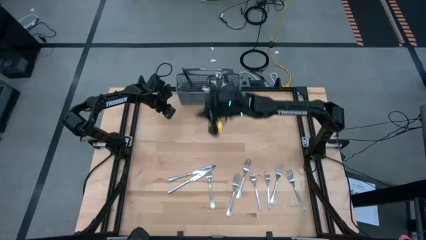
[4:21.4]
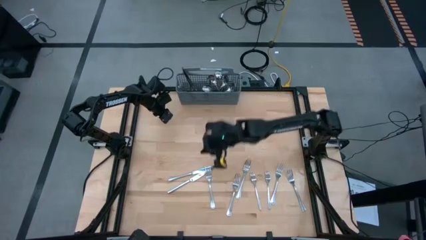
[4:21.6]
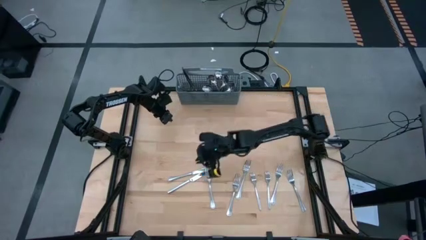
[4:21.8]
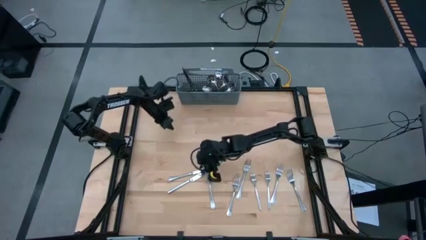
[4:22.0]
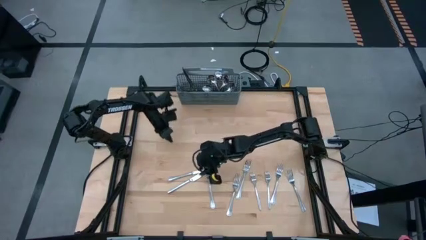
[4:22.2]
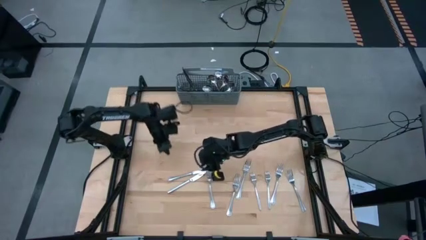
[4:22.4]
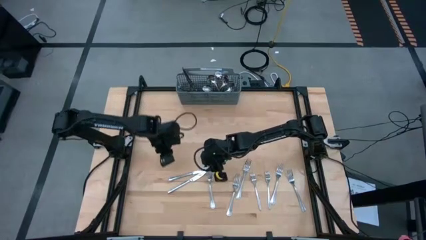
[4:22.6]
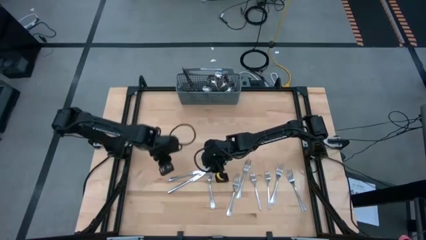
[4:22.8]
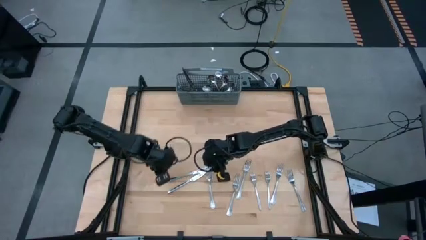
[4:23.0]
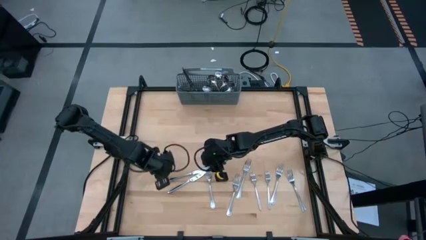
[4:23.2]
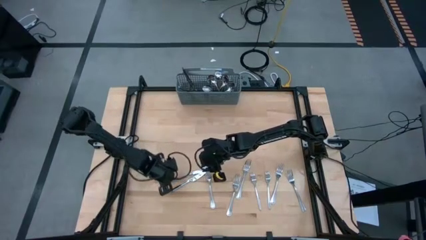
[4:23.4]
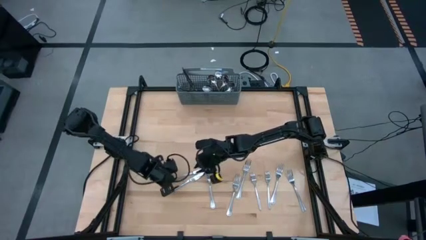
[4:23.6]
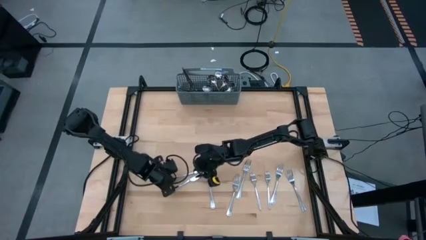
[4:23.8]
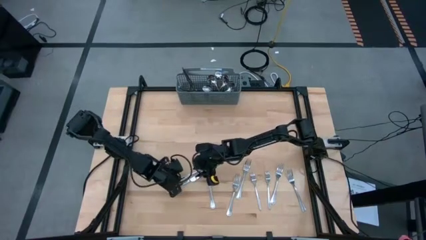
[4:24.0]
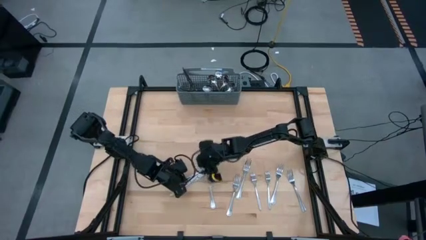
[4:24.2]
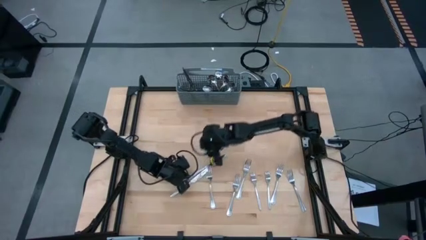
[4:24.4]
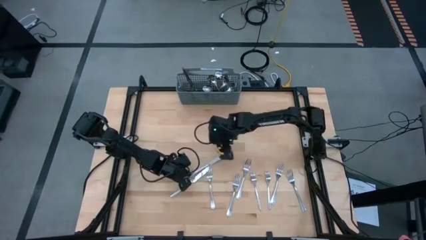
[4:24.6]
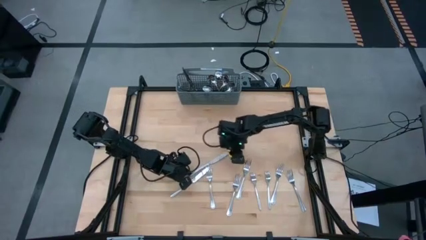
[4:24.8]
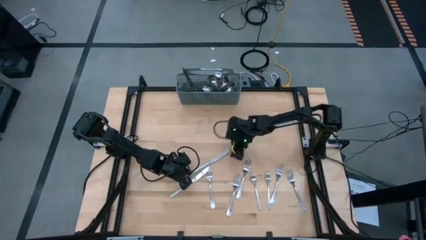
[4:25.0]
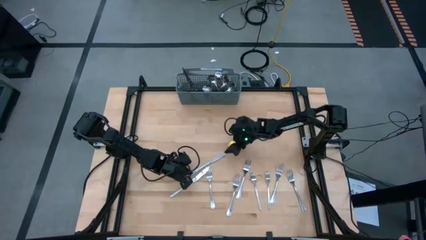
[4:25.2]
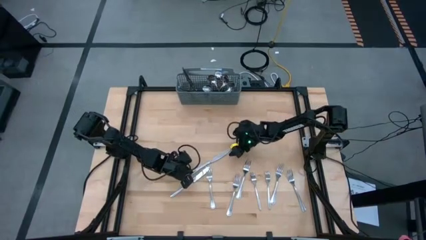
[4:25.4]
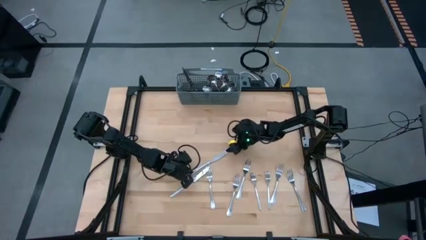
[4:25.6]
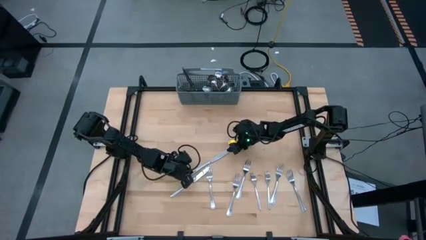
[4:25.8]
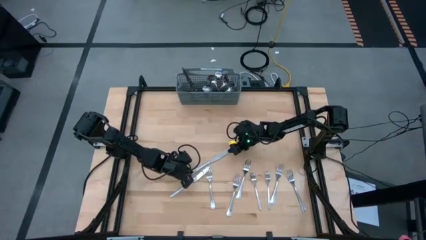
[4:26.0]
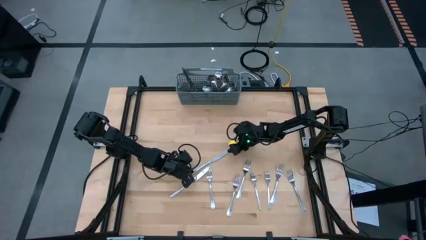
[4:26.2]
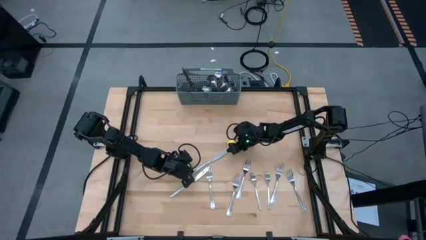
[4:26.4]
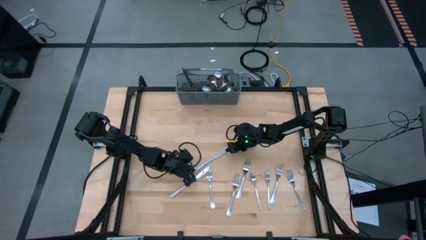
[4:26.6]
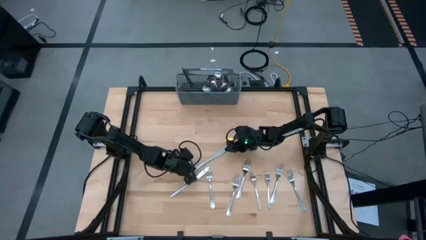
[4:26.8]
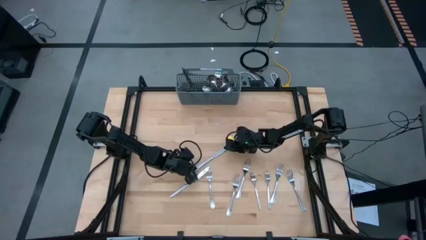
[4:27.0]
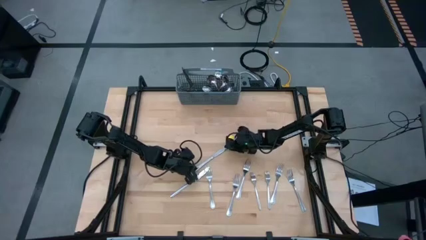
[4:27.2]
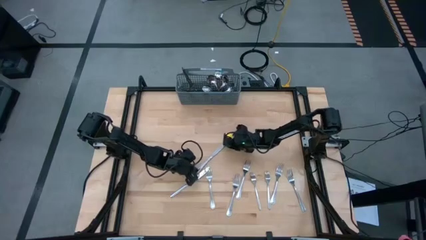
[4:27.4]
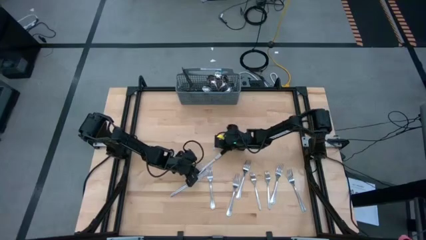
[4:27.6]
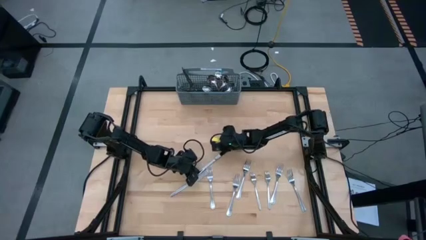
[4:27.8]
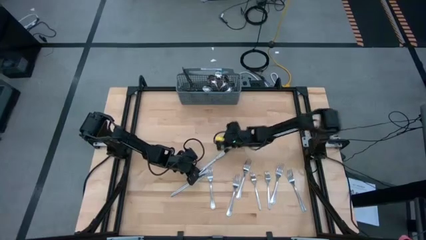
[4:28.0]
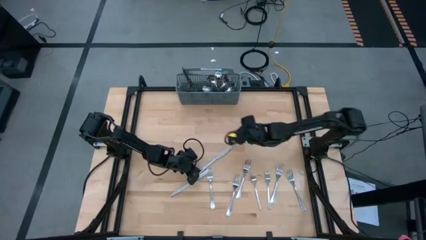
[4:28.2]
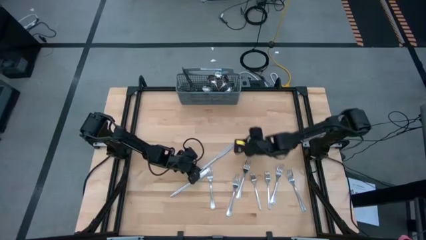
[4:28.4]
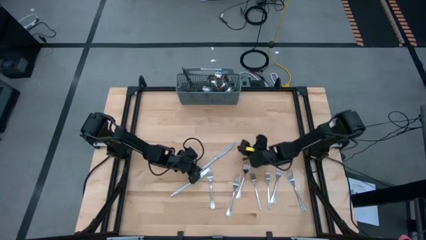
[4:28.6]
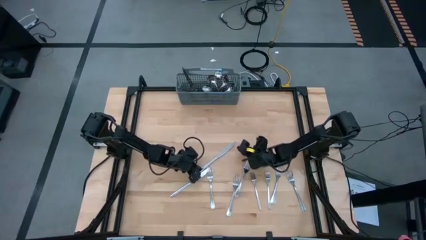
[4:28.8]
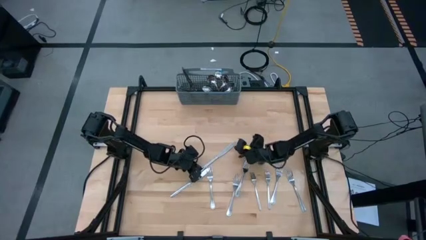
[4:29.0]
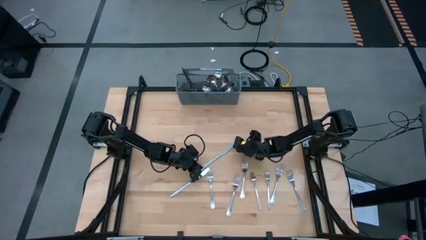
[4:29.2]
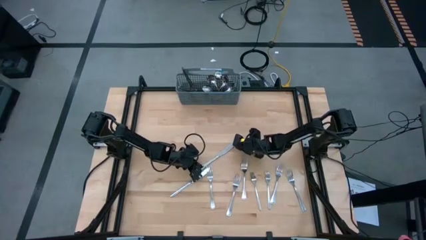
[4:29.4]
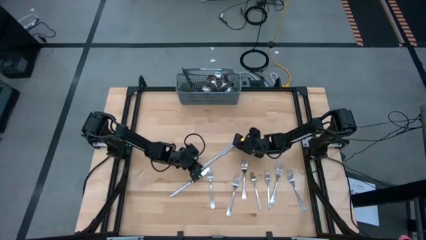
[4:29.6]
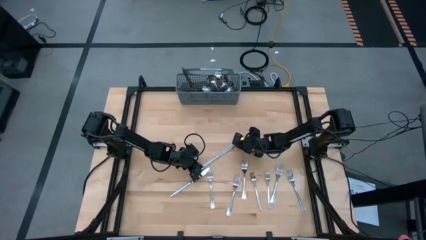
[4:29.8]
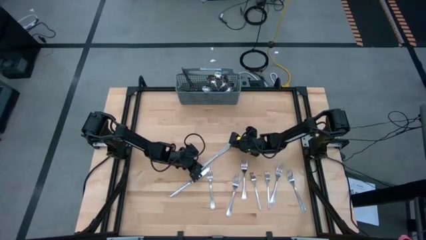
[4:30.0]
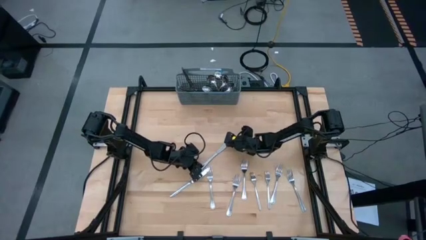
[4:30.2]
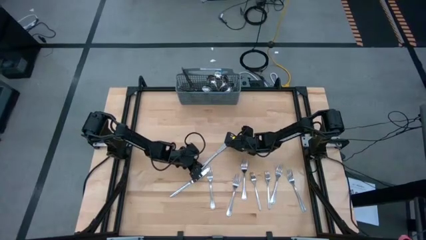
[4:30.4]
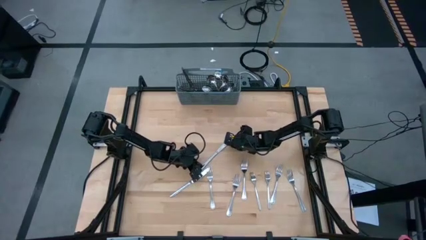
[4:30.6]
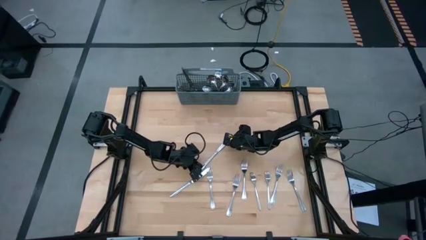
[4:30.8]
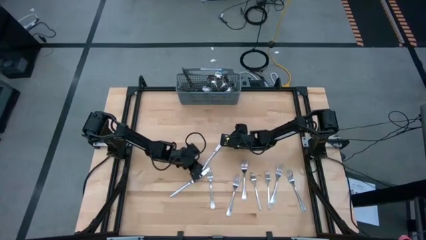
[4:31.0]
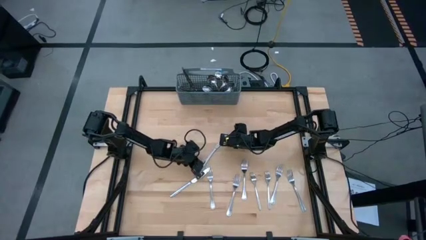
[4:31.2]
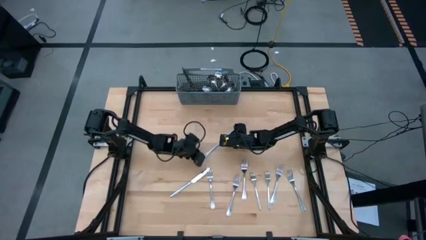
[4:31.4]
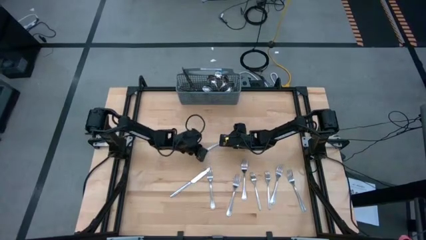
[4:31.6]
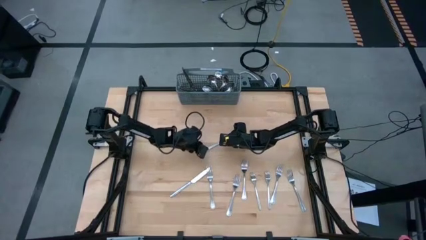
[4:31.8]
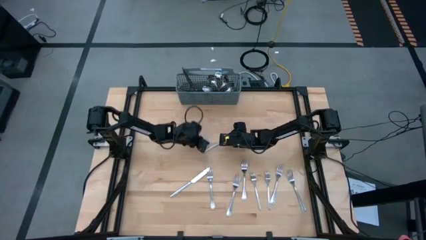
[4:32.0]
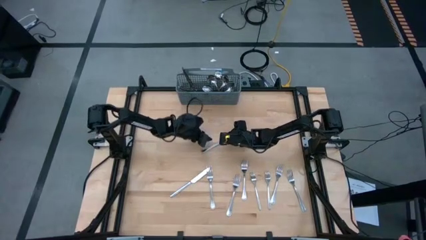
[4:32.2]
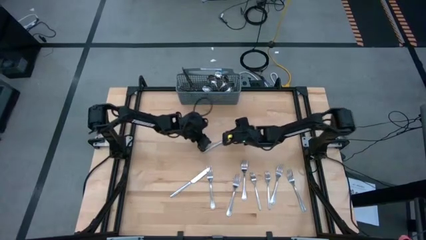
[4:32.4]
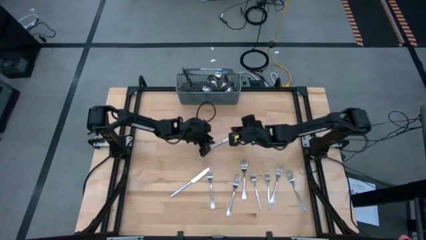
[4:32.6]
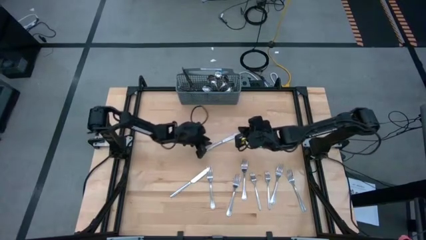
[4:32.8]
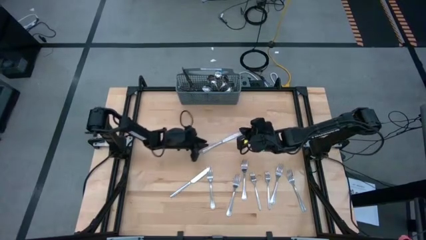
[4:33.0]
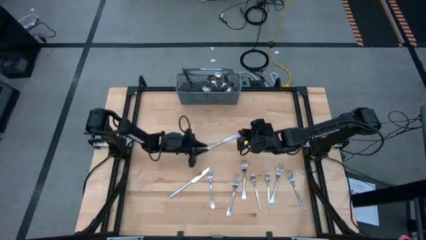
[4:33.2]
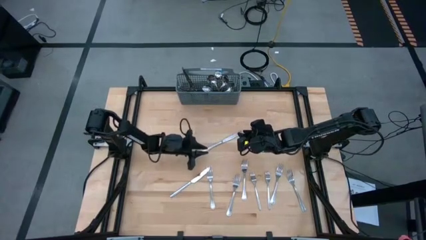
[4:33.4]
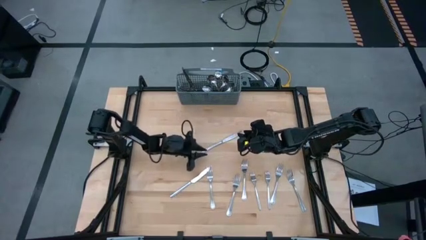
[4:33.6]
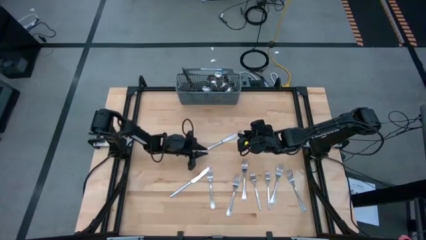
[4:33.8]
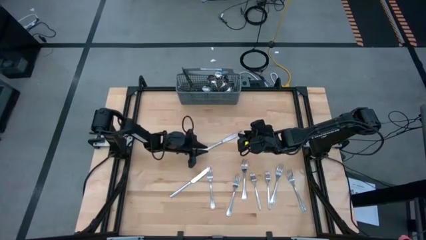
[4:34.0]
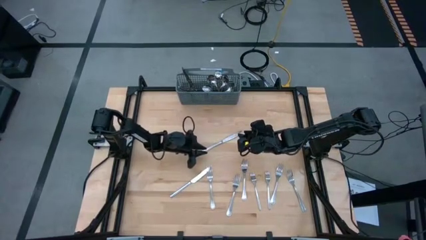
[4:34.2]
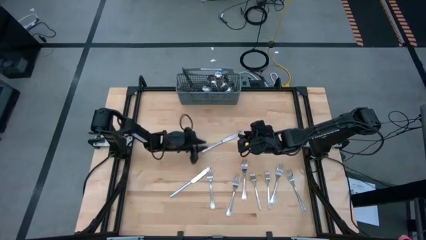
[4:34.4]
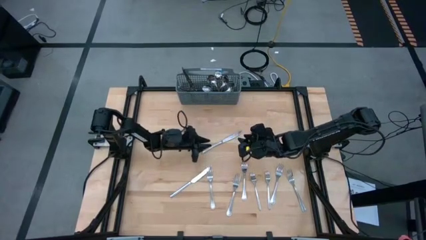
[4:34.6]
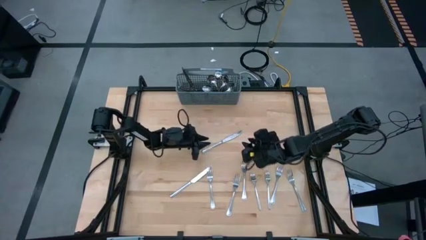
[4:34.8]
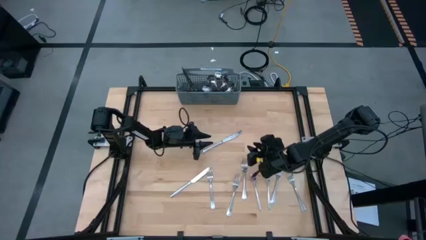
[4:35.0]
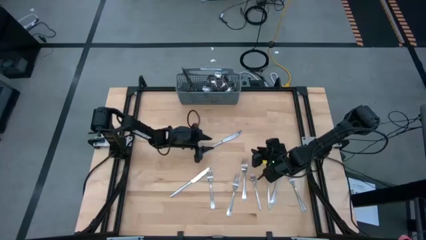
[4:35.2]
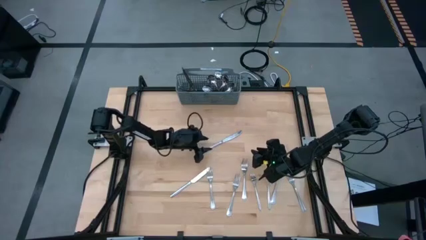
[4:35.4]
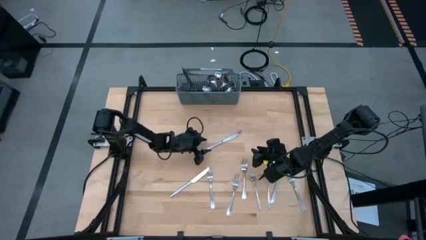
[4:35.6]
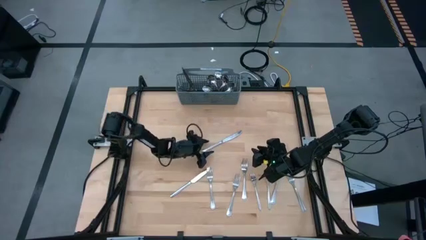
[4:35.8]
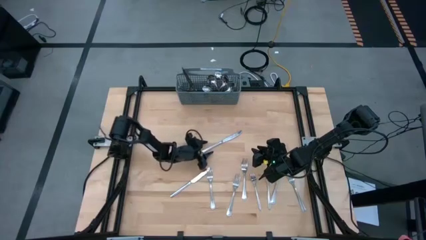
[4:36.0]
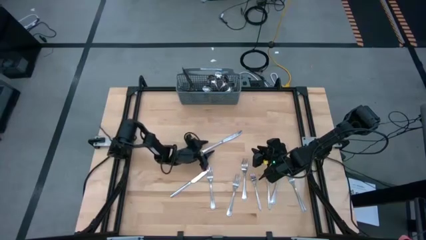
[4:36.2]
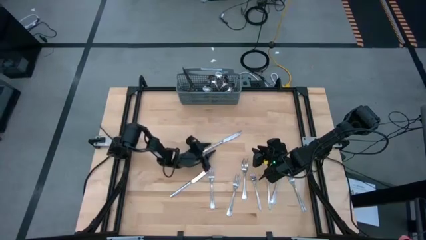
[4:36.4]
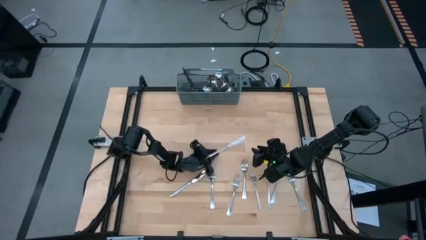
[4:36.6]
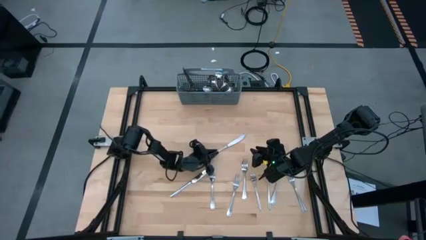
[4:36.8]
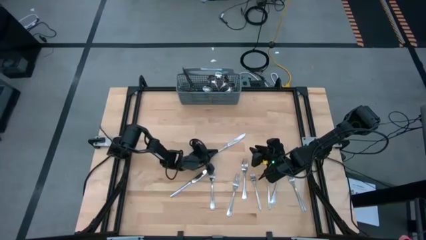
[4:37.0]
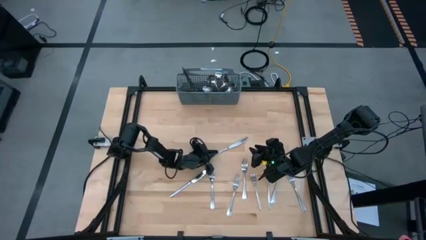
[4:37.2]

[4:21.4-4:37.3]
Task: Sort silverware
Put the silver knife into the gray utensil holder
